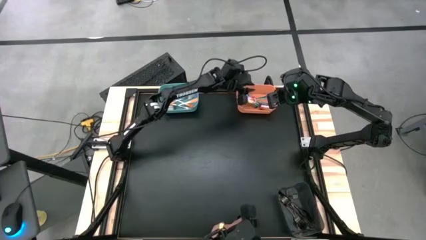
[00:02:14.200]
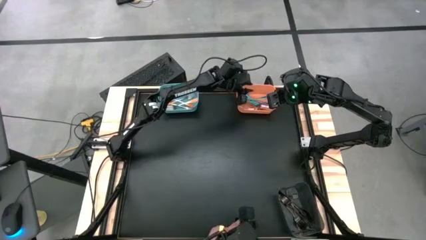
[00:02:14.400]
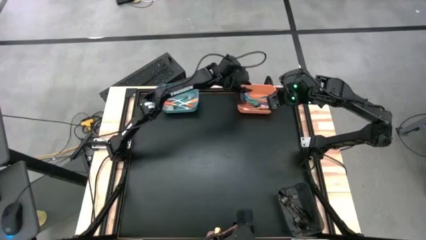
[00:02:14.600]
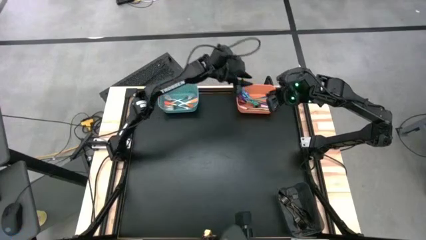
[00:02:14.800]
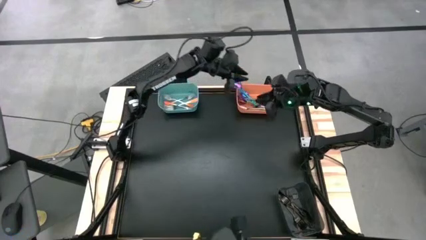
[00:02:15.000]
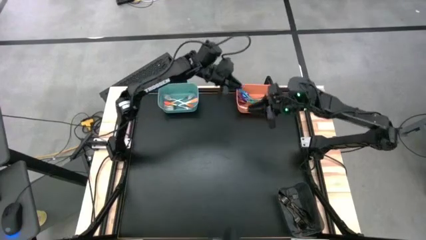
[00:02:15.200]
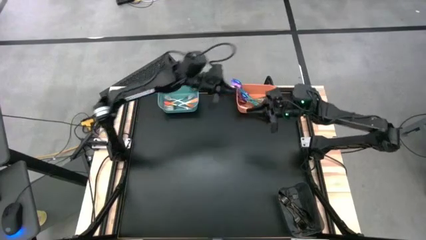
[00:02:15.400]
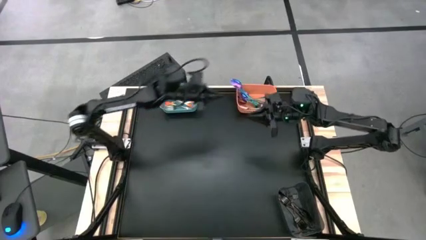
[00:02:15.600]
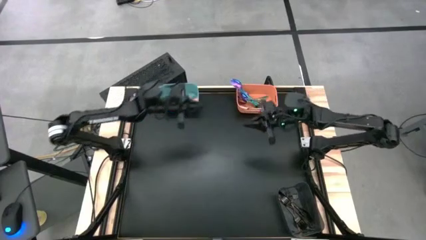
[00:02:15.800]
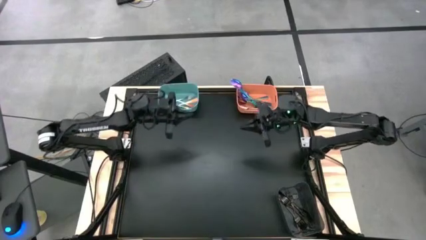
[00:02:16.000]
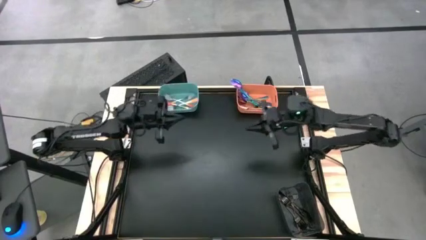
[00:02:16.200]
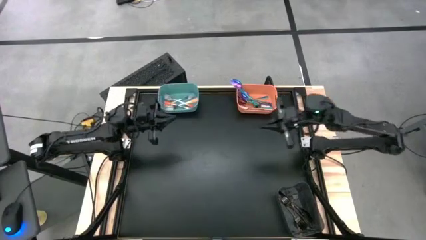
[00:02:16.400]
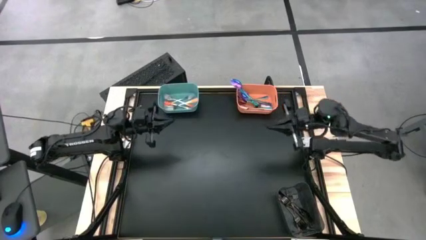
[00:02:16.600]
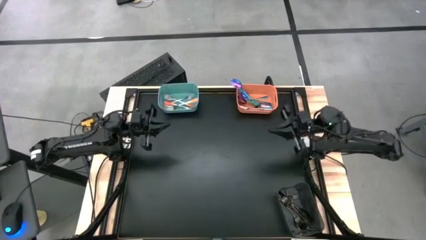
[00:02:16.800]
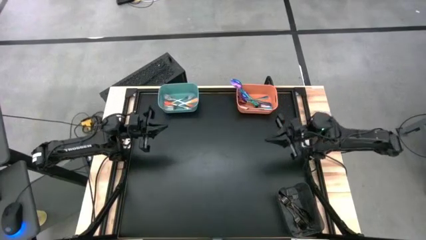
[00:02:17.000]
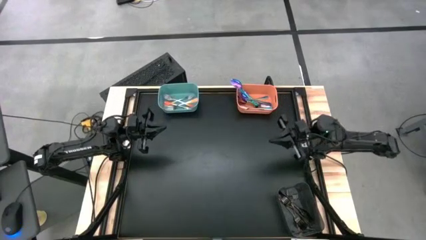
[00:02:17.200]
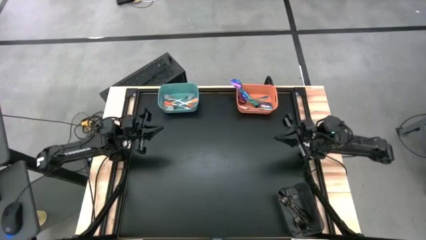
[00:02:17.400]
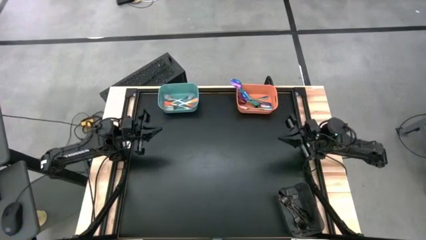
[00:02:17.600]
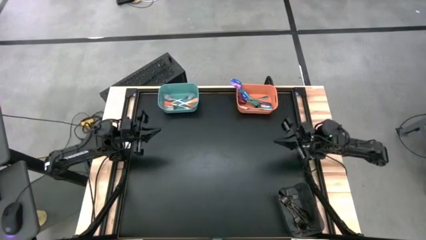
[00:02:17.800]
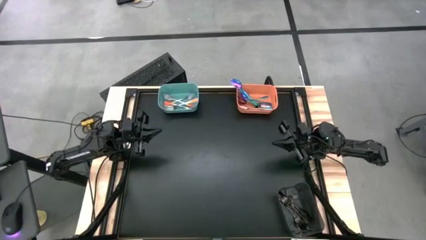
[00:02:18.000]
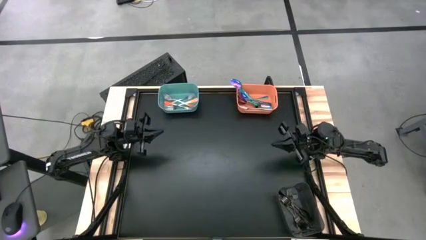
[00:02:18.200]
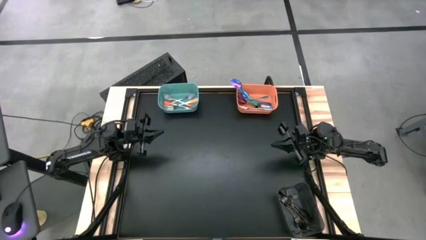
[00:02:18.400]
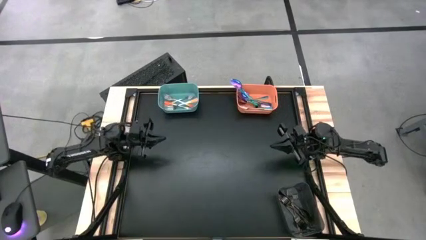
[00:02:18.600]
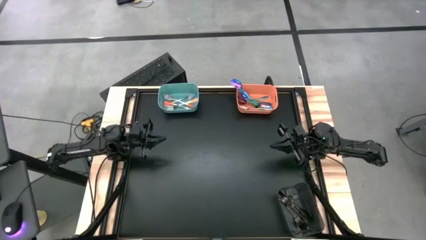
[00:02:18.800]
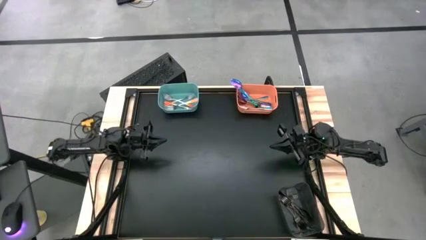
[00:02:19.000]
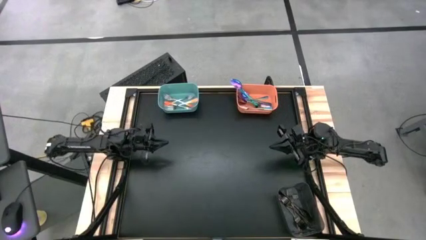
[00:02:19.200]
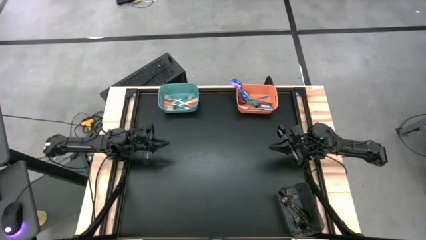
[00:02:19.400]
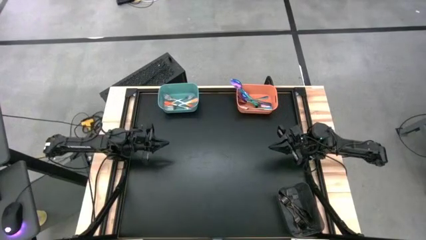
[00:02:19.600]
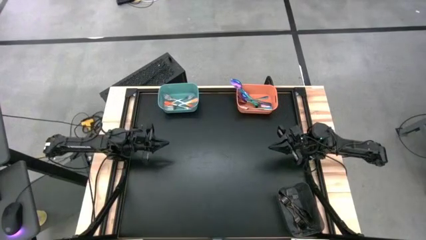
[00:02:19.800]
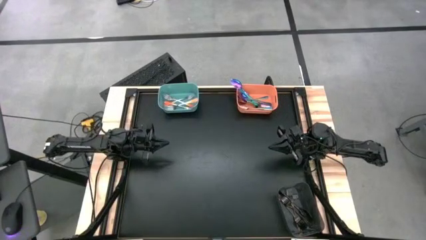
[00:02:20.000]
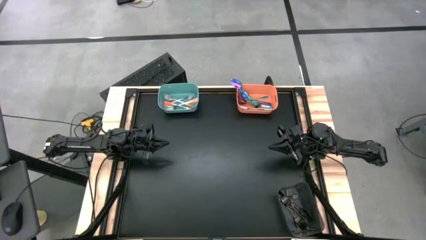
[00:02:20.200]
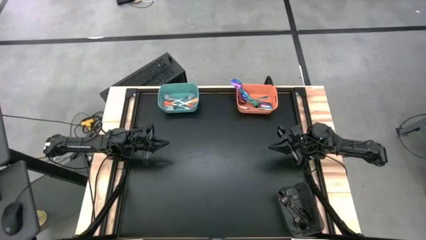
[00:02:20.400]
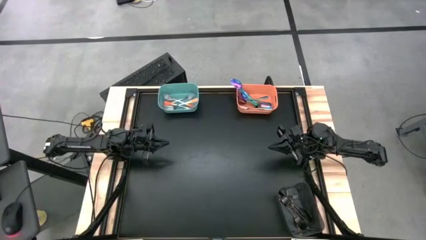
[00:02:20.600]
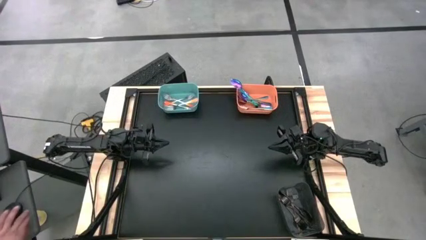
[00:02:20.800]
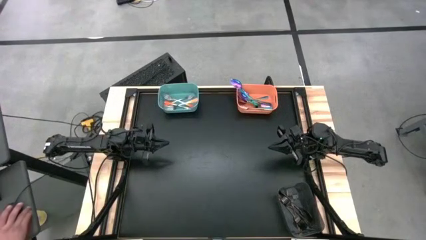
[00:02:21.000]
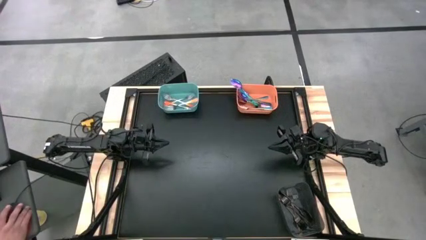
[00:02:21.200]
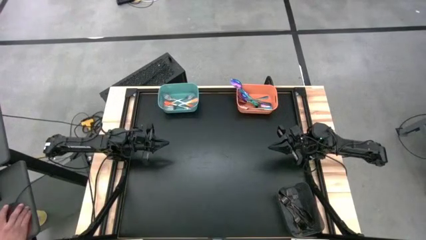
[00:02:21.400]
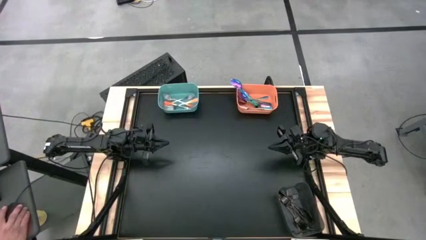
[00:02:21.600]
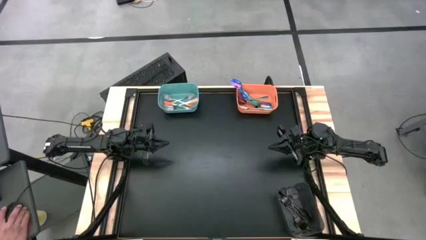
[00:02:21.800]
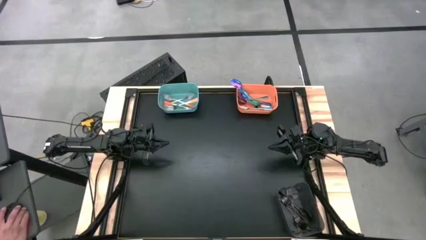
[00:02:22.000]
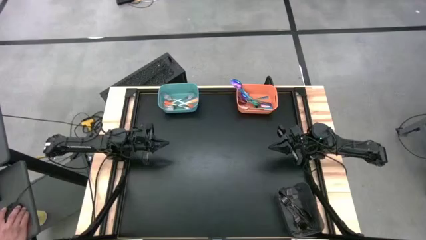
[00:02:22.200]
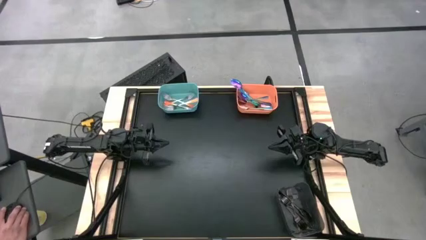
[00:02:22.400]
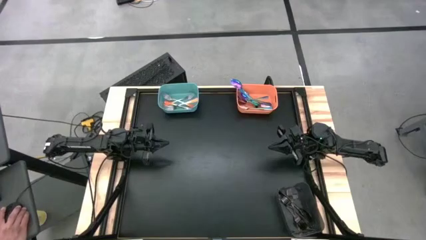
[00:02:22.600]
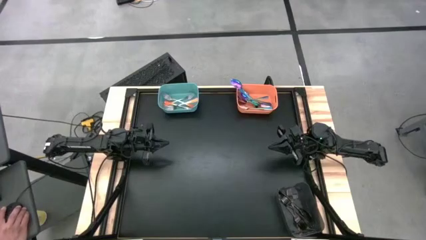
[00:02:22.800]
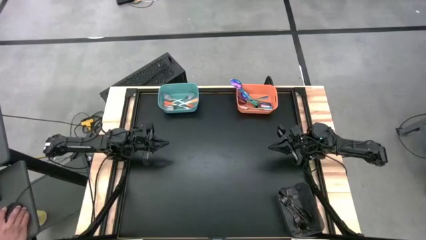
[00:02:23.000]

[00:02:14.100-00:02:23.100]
Task: Sort silverware by color (type)
Return to Home Position

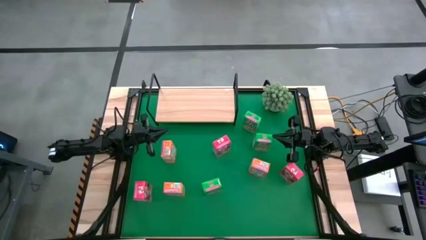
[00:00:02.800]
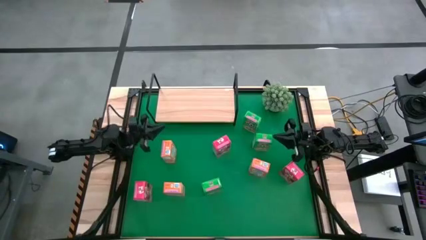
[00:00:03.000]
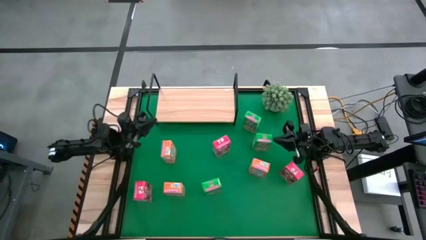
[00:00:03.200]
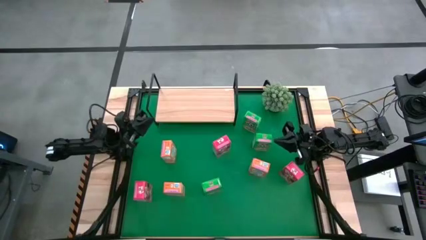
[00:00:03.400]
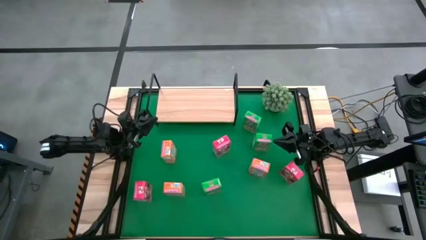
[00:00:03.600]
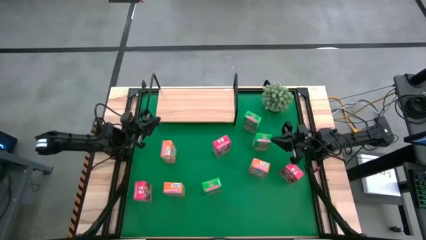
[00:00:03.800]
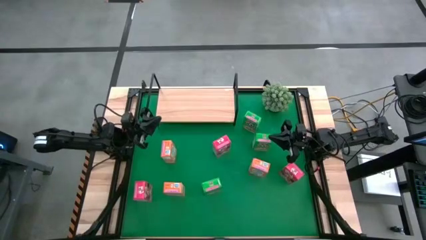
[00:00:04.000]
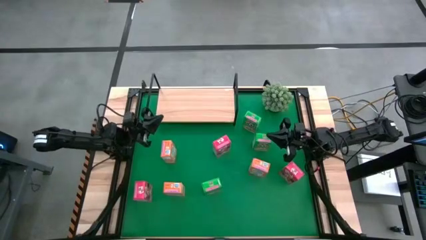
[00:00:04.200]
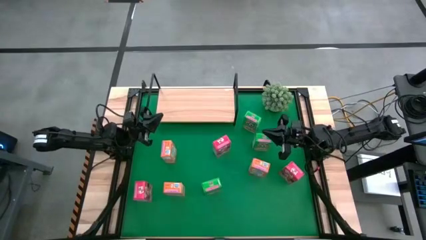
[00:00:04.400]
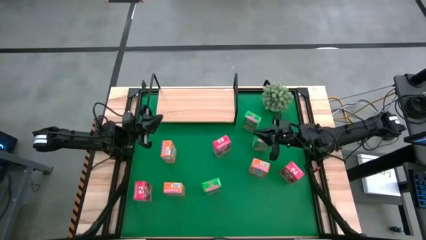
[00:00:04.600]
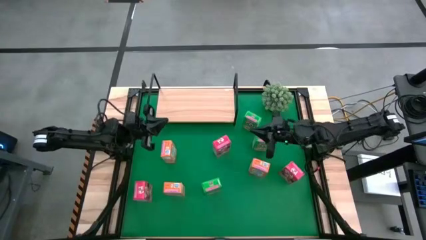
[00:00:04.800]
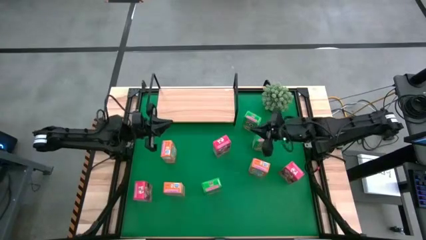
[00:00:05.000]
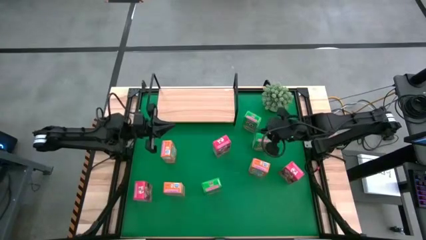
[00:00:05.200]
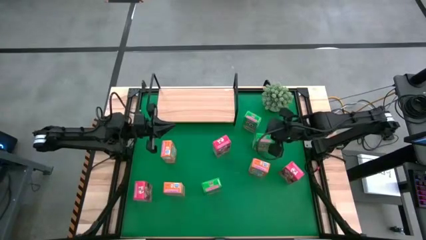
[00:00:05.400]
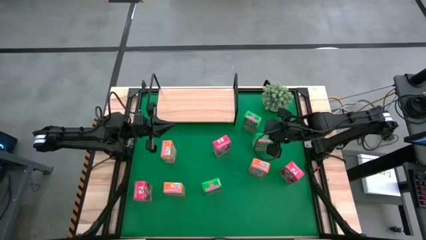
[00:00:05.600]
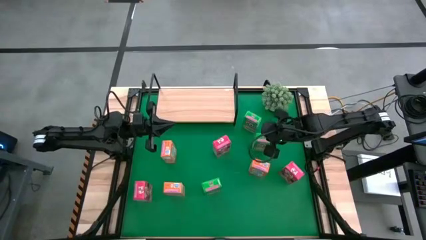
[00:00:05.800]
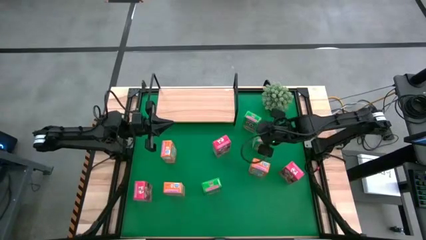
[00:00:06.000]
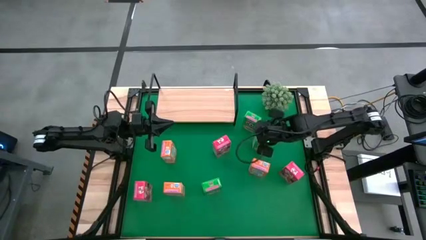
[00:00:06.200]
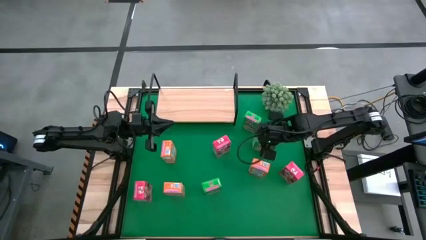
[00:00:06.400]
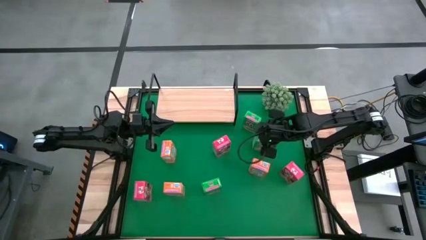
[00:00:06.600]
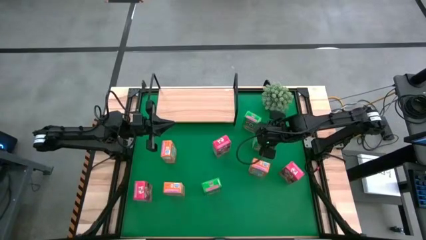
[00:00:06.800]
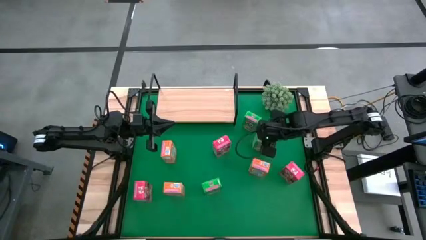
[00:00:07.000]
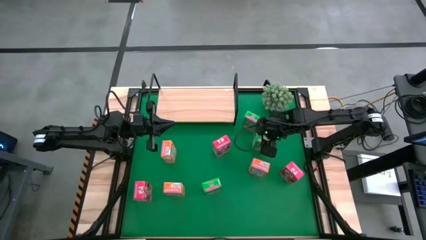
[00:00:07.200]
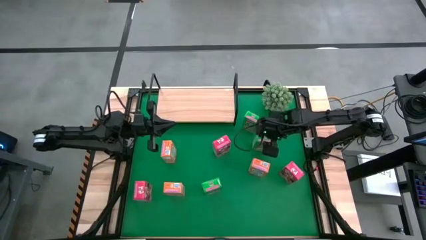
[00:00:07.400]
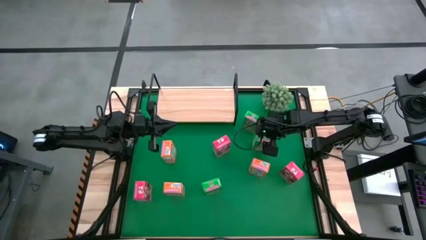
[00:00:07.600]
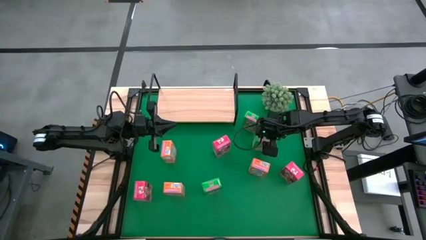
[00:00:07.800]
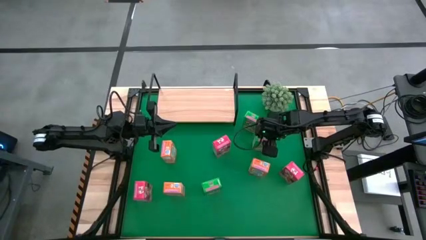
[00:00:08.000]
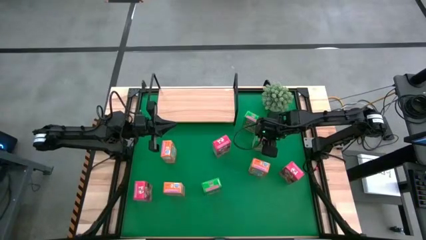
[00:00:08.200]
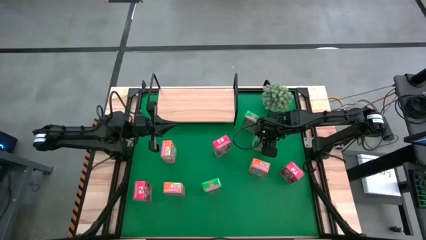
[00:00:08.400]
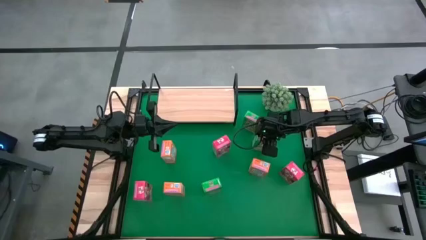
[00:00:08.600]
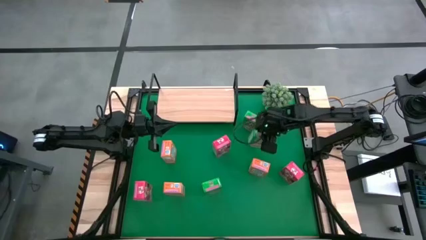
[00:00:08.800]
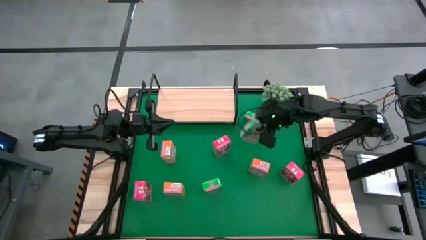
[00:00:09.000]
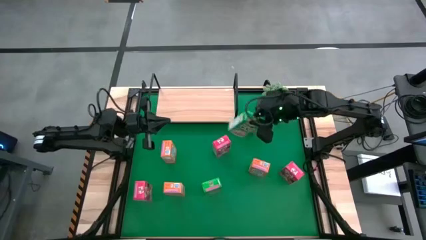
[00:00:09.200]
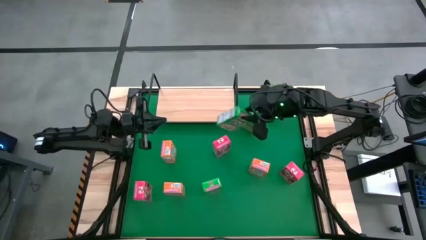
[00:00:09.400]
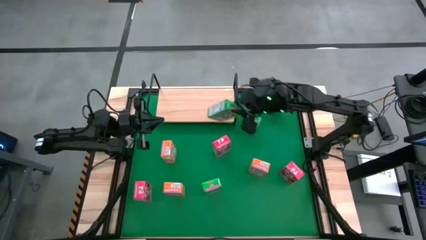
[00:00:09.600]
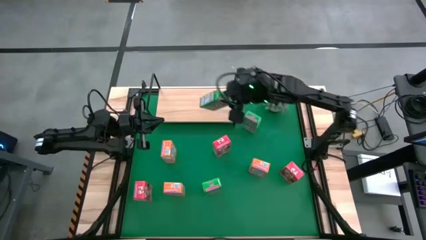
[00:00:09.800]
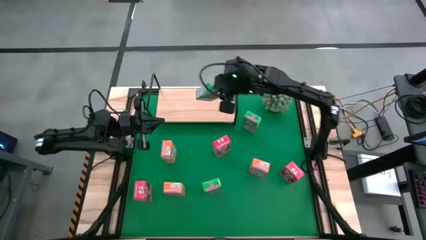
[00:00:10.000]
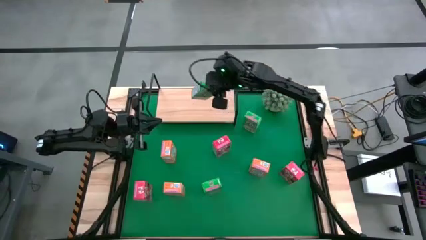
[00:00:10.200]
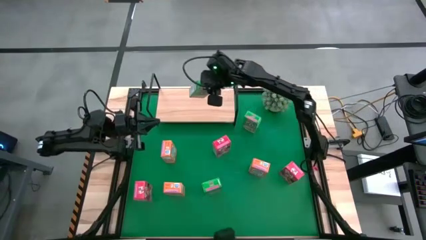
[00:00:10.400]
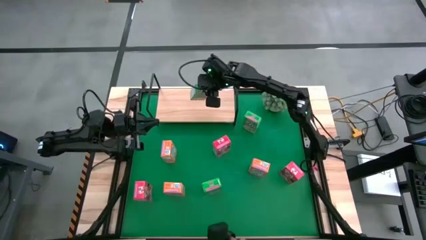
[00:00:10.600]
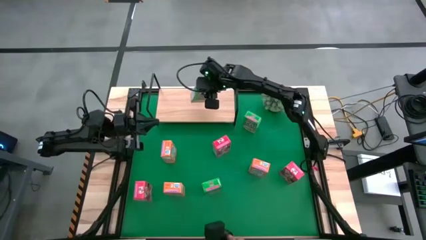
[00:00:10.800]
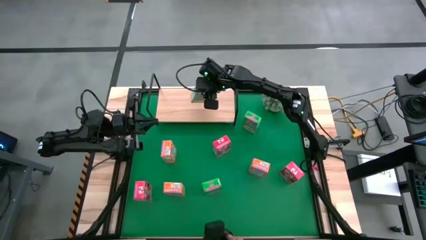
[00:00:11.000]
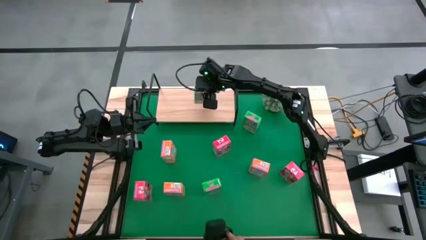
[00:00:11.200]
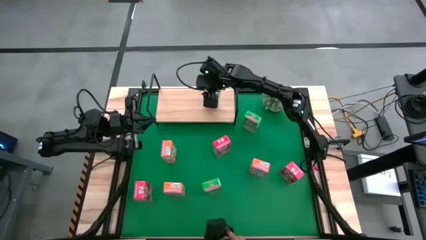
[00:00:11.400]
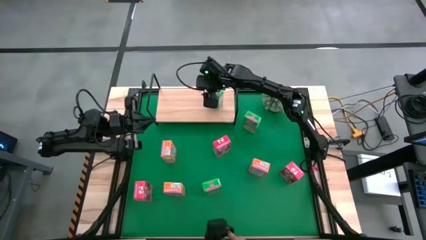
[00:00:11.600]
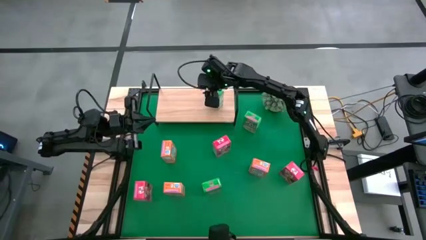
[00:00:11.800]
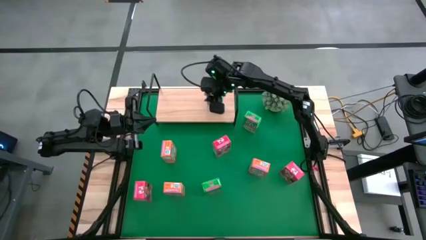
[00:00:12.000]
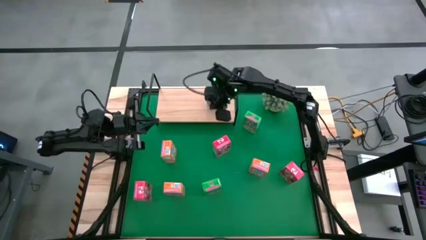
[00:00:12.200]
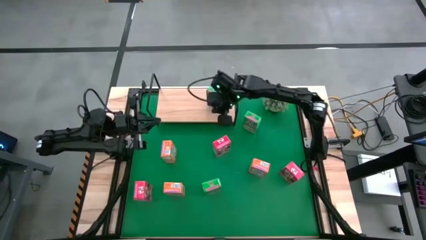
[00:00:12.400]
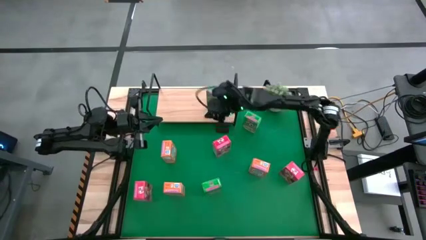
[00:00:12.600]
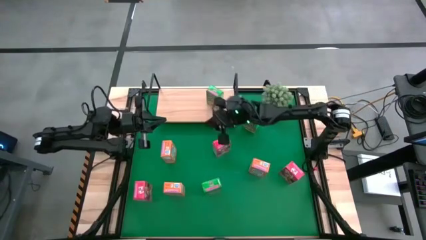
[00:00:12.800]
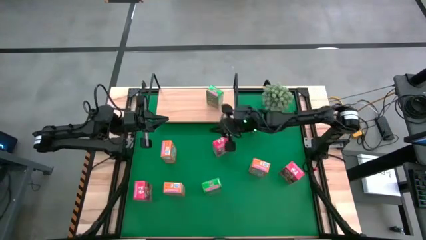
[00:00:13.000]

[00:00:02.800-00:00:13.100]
Task: Stack cereal on shelf
Put the middle right green cereal box on the shelf
